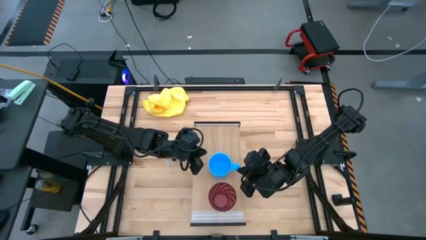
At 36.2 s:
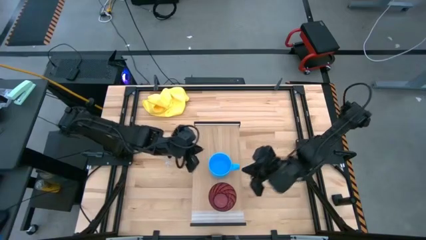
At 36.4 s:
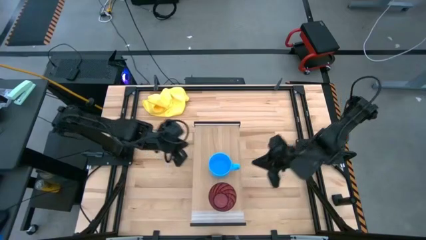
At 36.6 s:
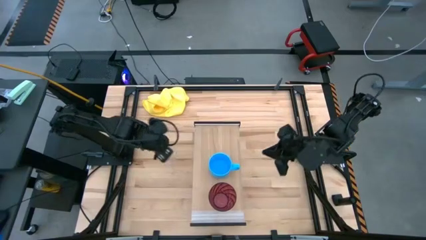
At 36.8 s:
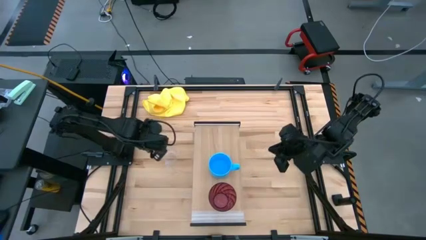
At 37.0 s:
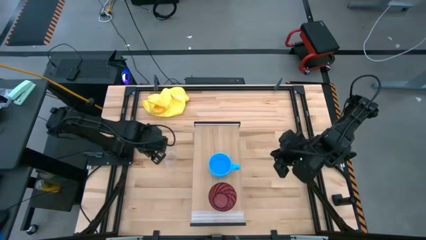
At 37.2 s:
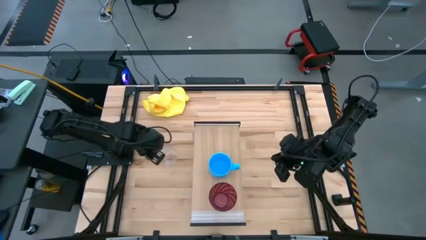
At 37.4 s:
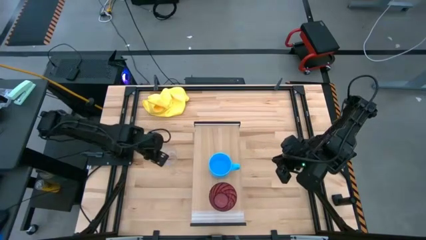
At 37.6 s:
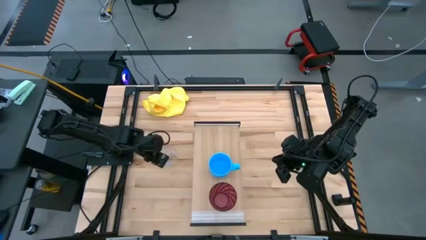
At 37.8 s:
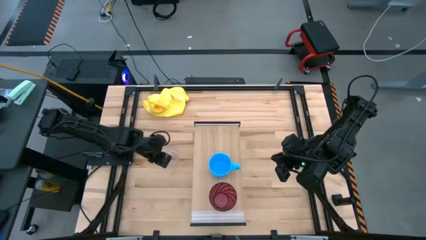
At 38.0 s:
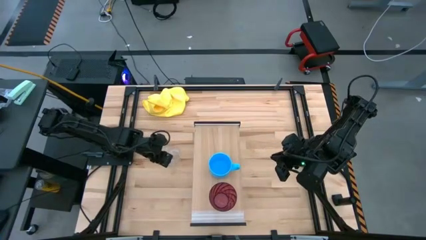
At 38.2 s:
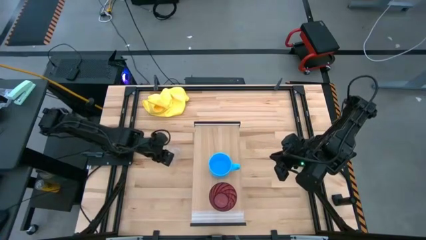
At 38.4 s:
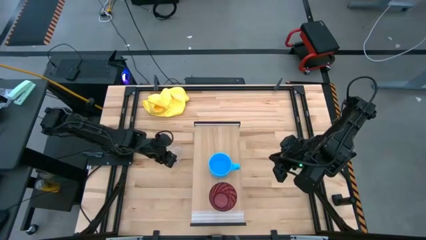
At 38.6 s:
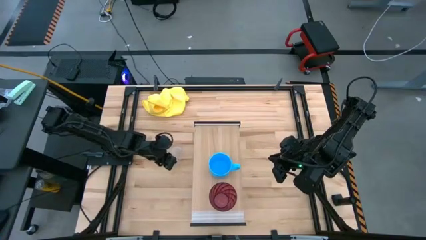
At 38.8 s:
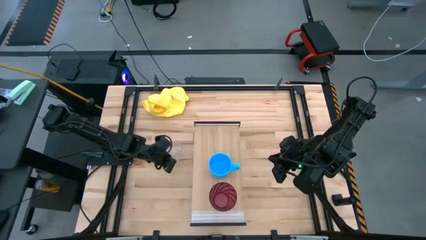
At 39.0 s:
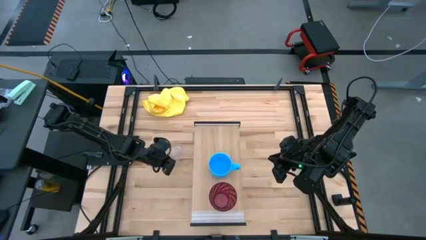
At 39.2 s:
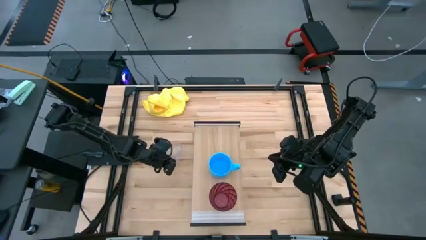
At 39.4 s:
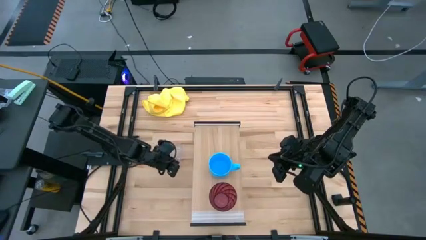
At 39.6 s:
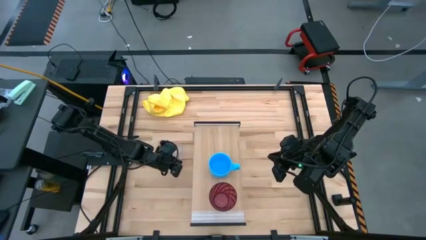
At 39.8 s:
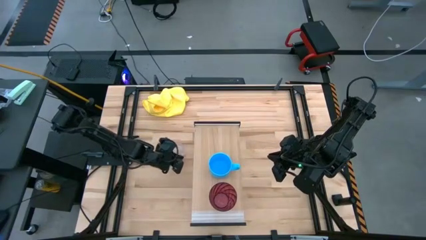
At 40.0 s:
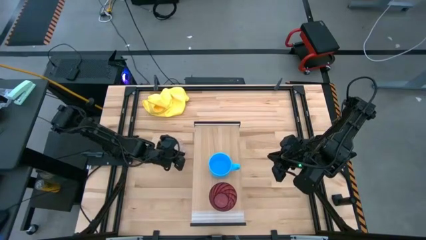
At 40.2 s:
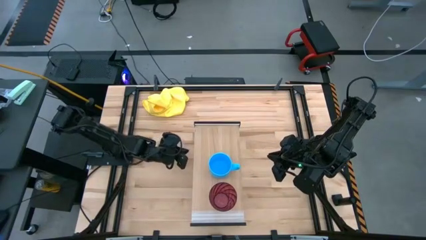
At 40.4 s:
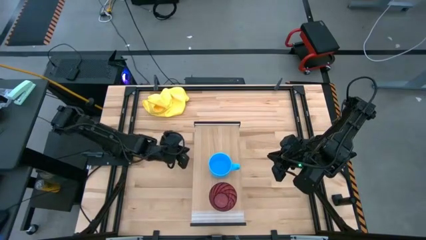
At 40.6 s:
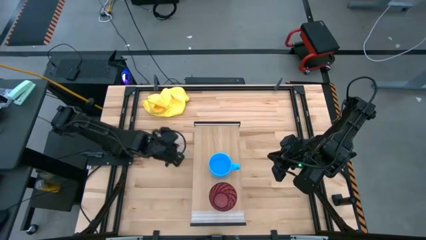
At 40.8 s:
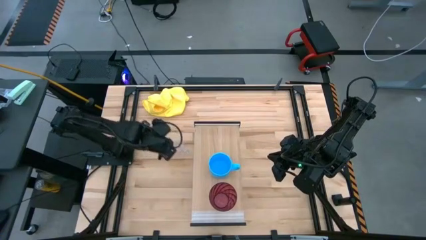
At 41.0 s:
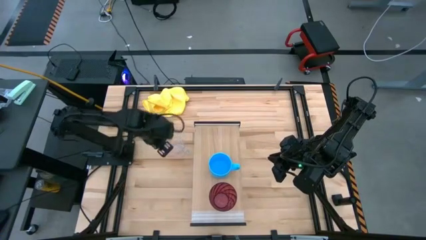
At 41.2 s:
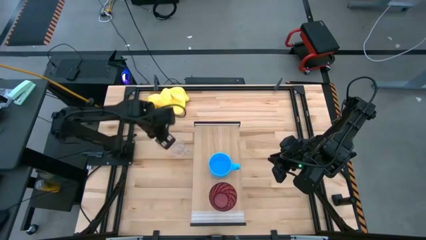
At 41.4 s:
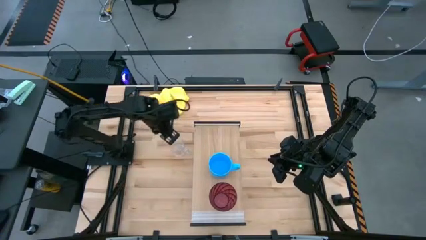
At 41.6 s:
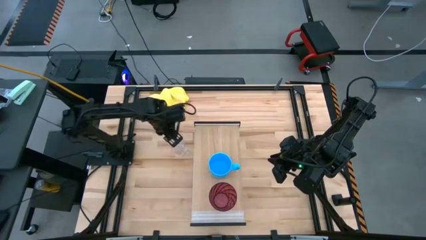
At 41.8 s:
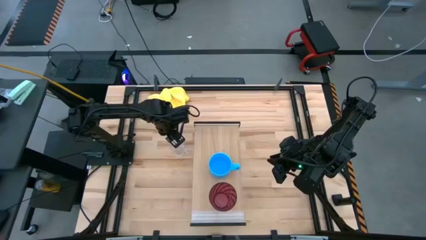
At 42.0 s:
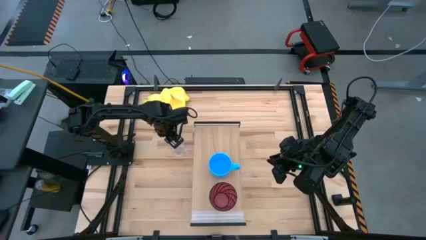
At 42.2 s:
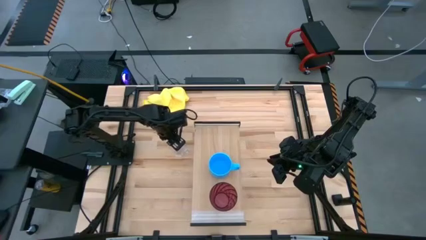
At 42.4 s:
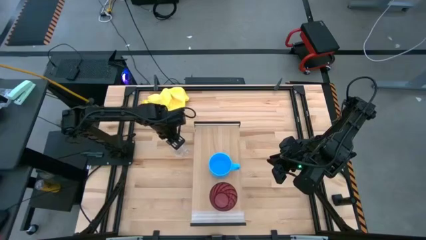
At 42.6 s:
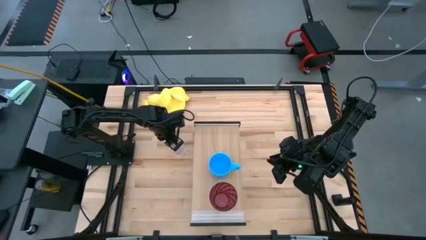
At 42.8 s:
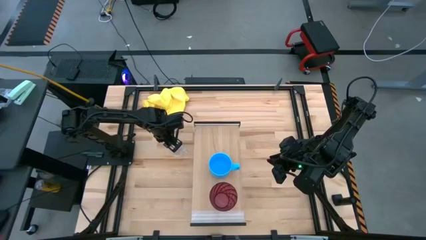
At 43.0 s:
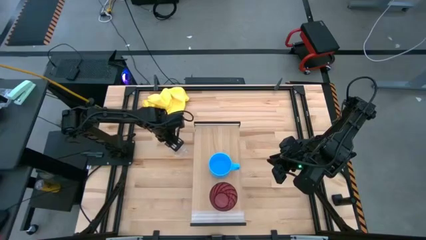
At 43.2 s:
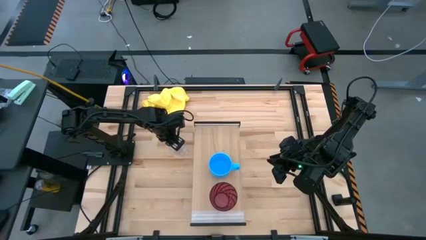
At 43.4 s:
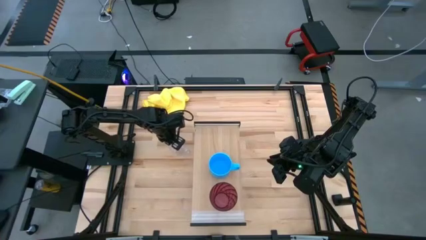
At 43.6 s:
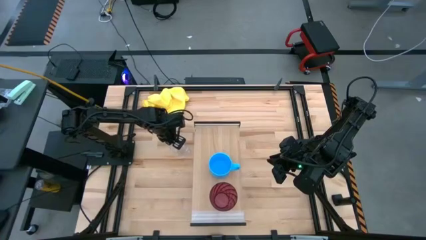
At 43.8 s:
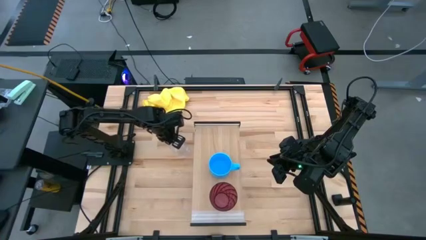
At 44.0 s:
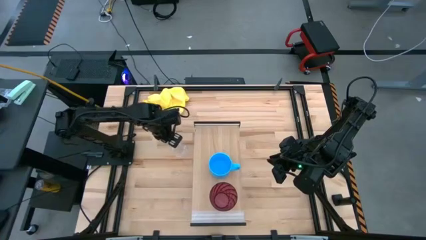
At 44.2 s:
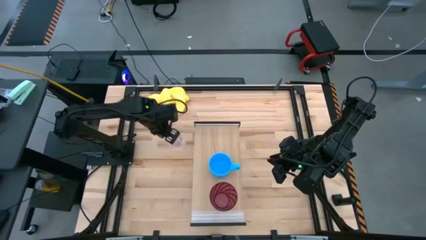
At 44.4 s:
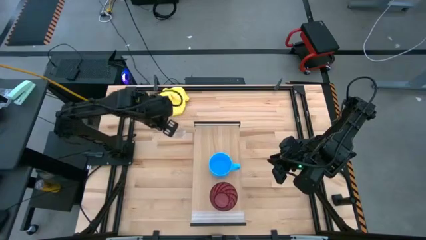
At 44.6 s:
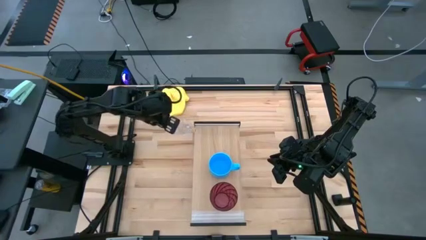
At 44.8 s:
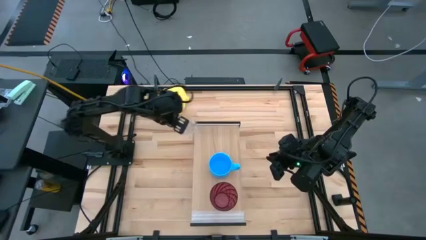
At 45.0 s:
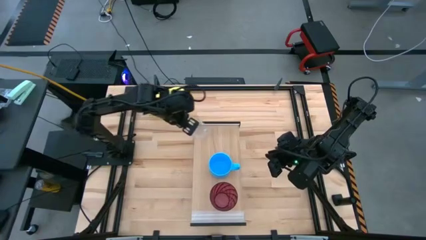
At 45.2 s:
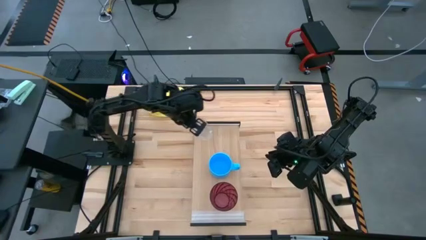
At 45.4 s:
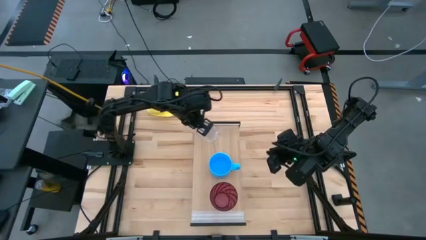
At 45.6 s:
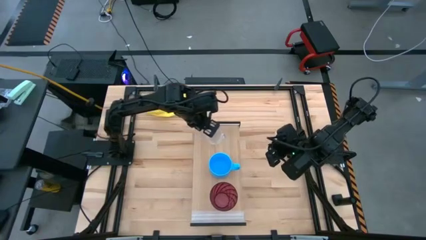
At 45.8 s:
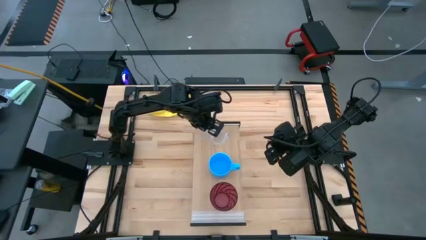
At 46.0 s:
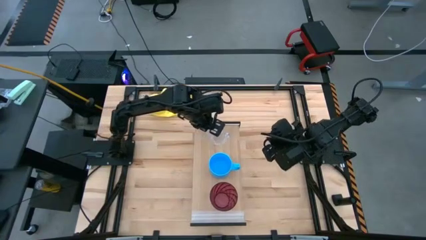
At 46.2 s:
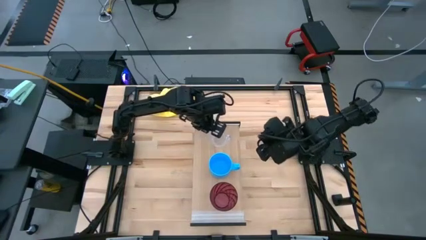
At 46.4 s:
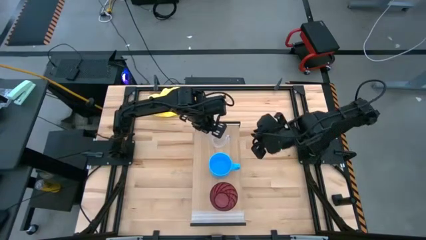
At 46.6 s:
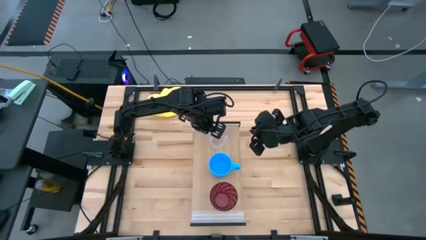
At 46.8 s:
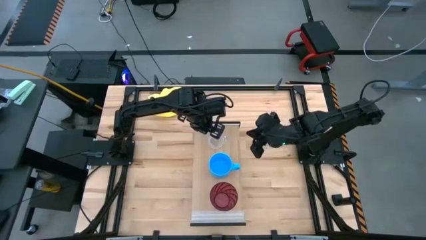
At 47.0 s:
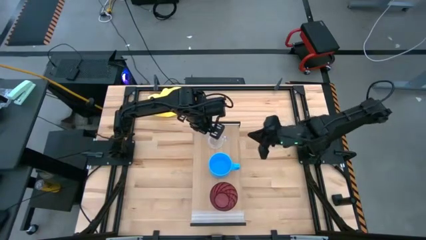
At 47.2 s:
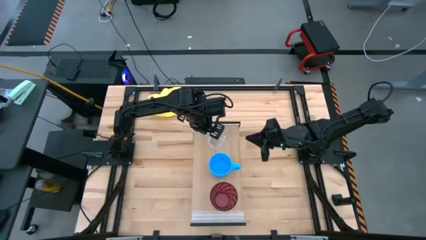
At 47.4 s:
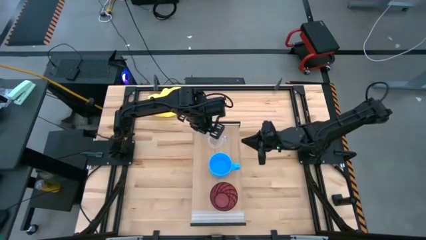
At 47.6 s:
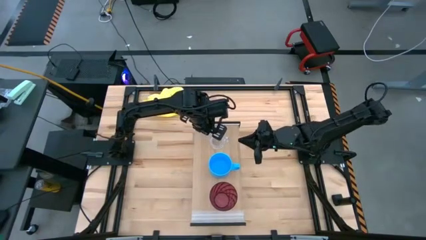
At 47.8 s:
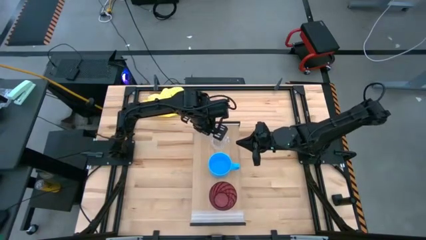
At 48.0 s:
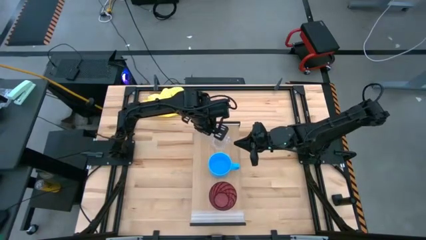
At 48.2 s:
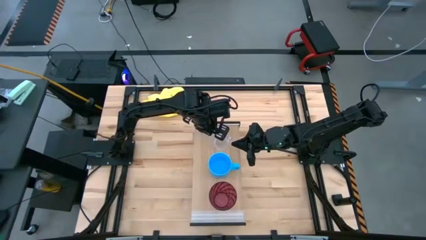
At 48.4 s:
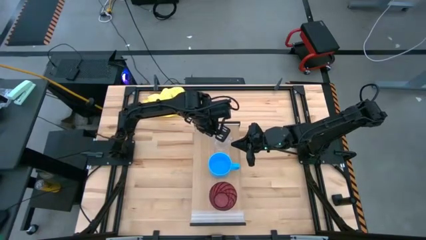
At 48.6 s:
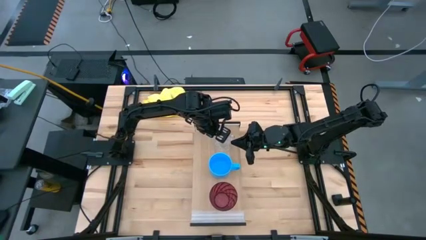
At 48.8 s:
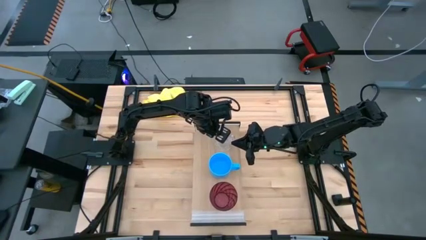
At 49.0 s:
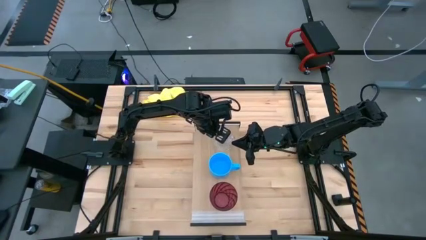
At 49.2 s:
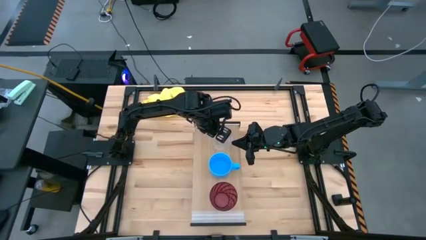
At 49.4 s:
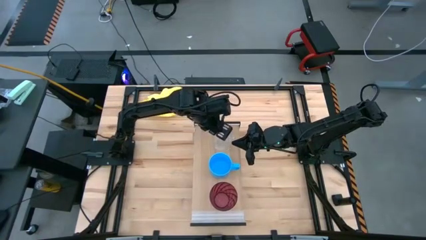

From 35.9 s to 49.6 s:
Task: Stack small to large cups/mugs on shelf
Put the transparent cup on the shelf

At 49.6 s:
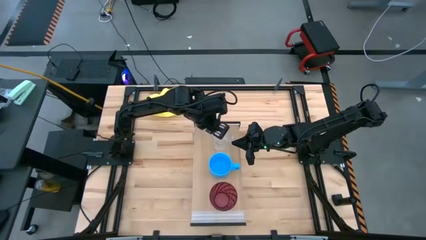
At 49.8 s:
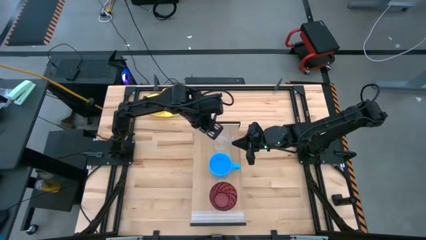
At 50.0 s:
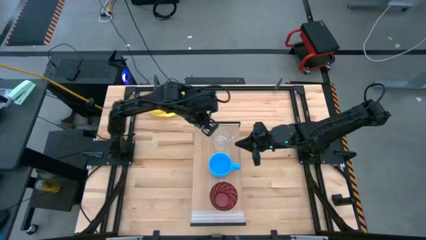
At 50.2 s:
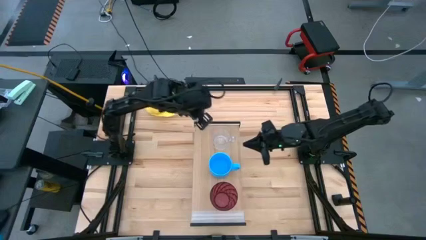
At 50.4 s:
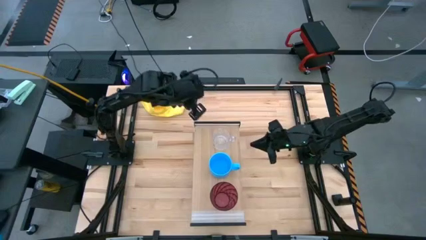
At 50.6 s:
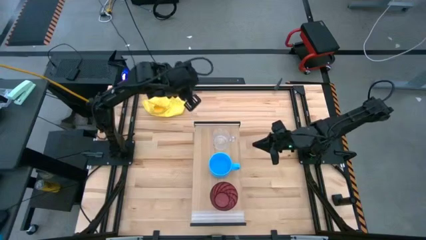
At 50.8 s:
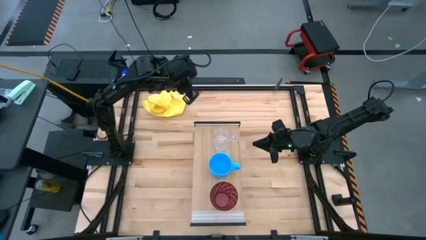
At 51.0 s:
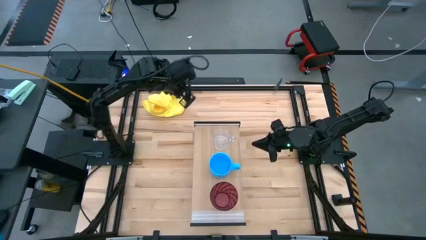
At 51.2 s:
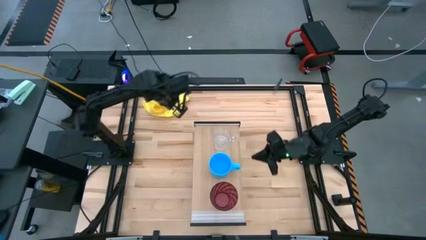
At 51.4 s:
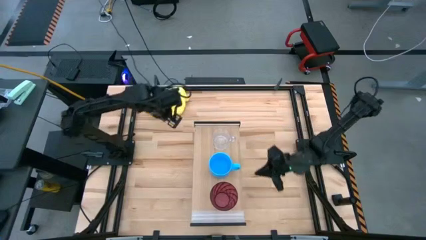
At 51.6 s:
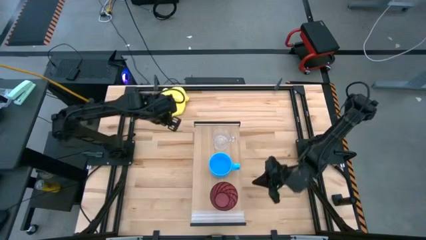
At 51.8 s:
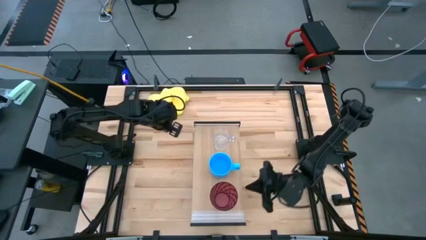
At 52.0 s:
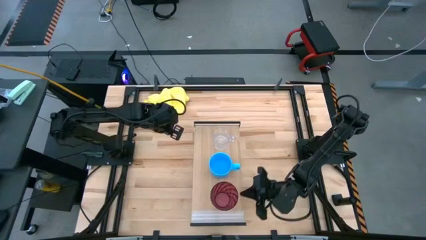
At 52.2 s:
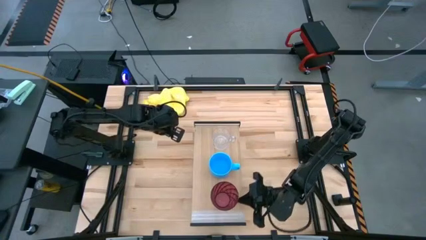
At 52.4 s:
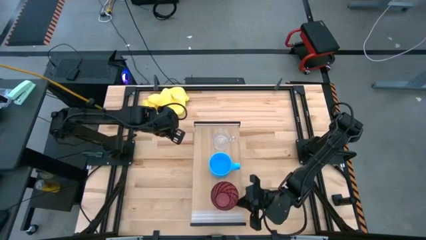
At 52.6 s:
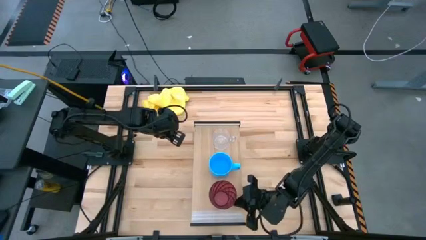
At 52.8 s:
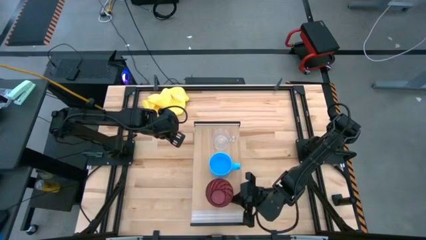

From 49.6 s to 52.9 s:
Adjust the red cup on the shelf
